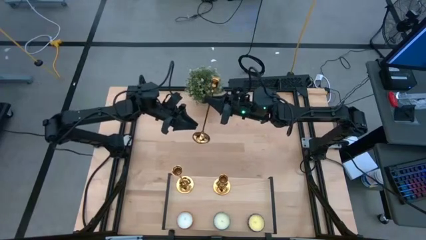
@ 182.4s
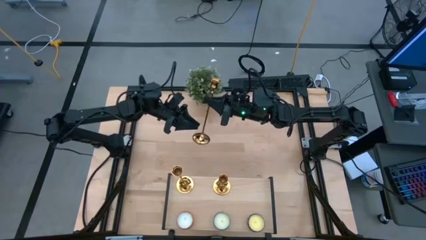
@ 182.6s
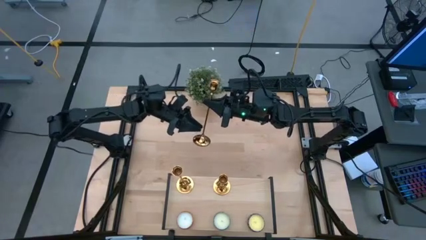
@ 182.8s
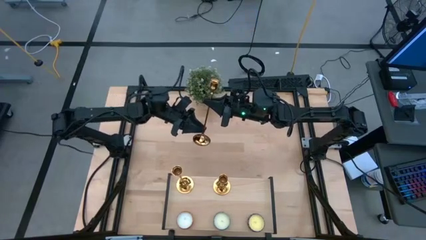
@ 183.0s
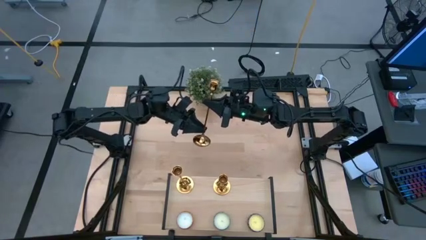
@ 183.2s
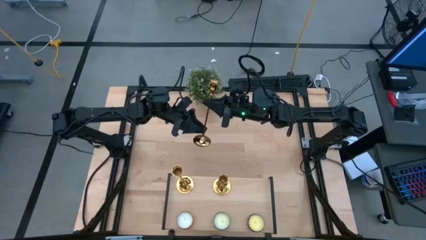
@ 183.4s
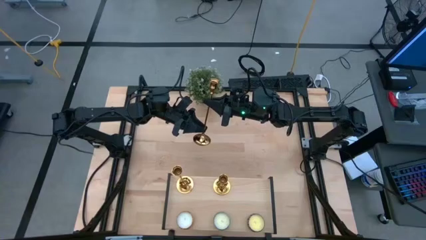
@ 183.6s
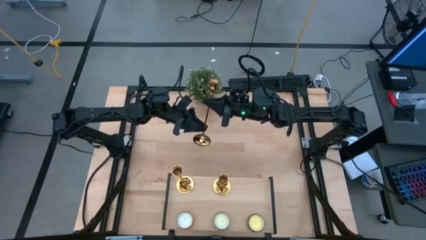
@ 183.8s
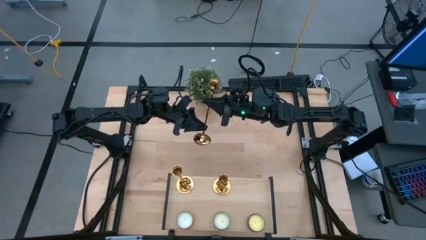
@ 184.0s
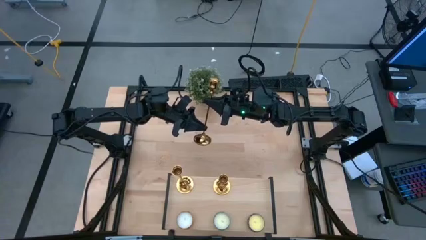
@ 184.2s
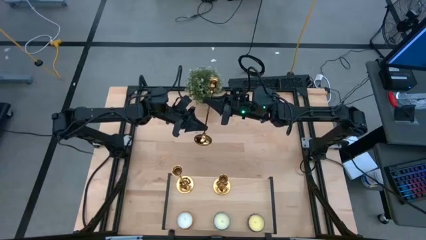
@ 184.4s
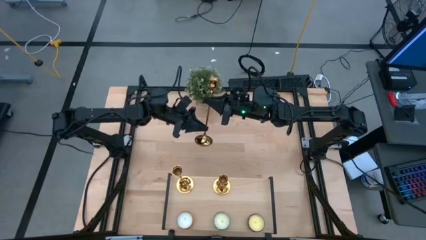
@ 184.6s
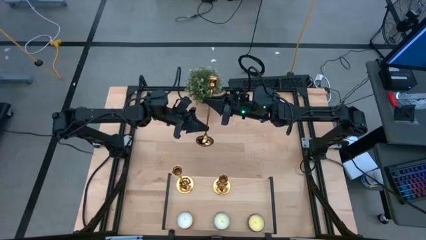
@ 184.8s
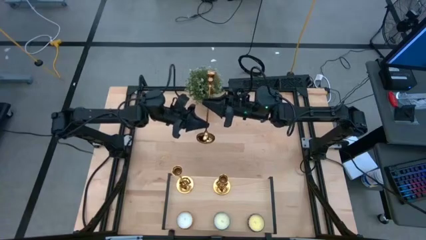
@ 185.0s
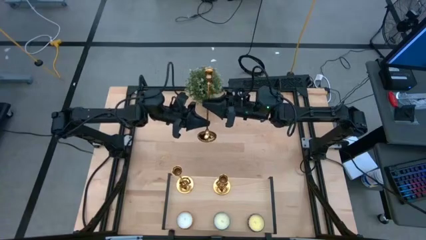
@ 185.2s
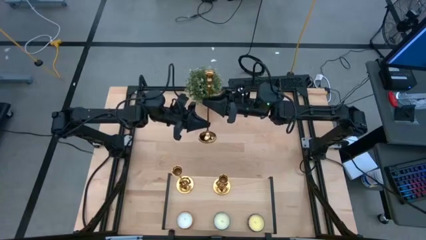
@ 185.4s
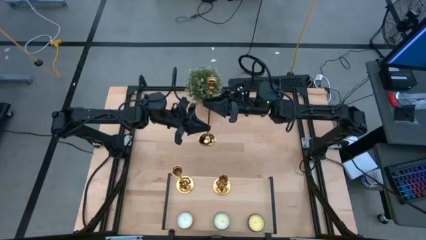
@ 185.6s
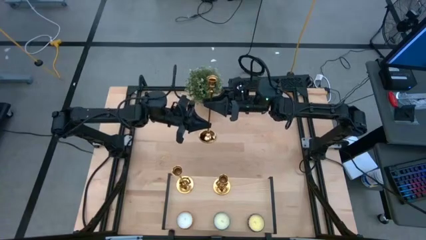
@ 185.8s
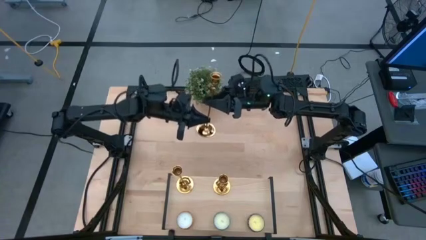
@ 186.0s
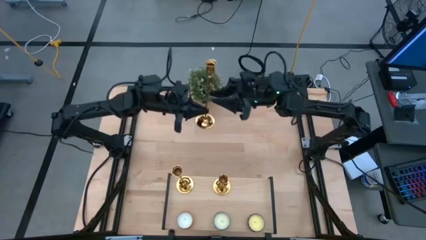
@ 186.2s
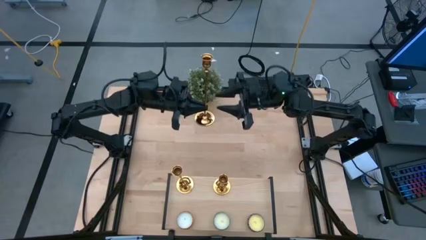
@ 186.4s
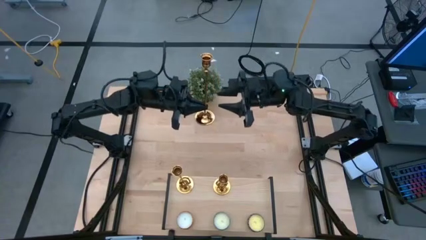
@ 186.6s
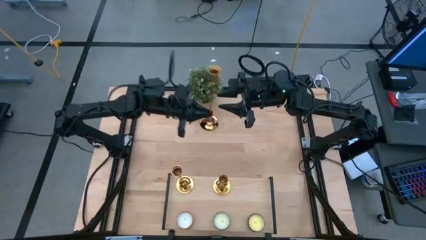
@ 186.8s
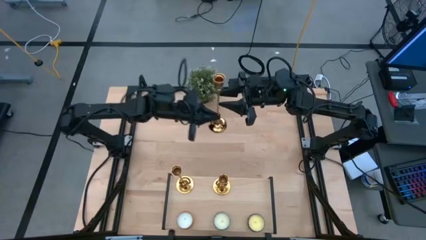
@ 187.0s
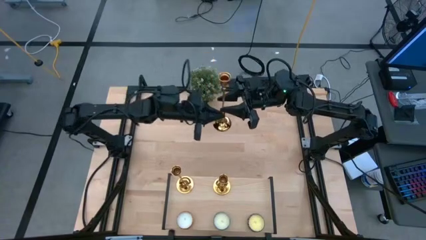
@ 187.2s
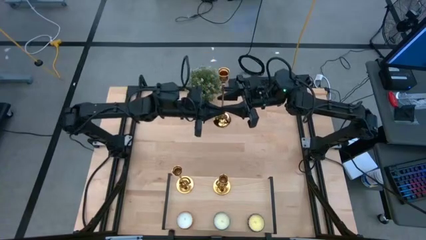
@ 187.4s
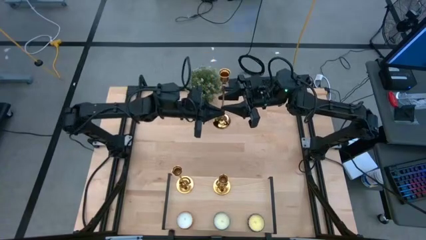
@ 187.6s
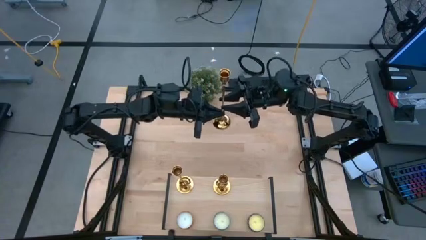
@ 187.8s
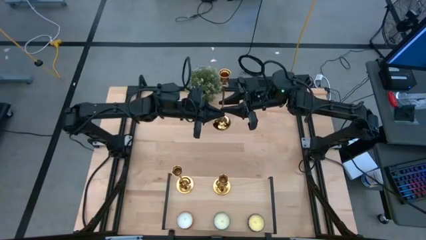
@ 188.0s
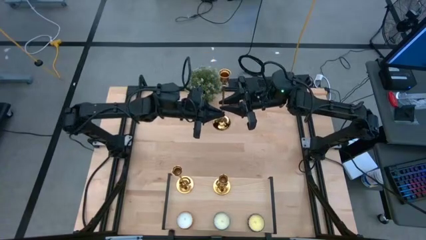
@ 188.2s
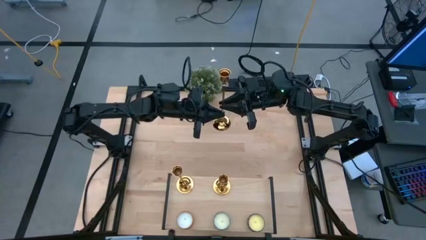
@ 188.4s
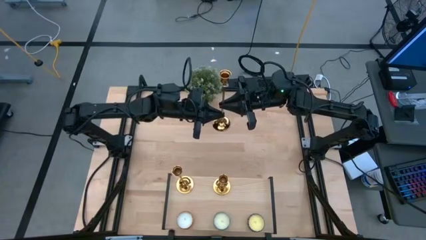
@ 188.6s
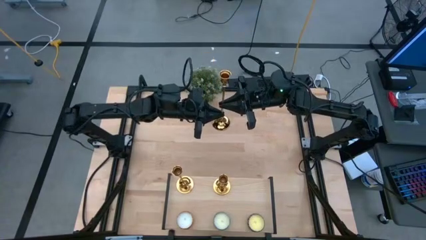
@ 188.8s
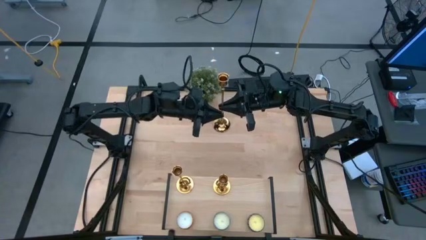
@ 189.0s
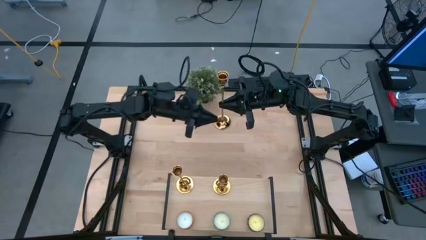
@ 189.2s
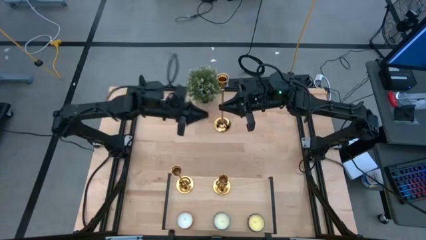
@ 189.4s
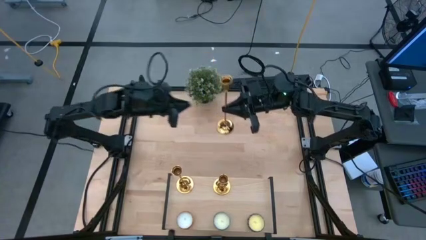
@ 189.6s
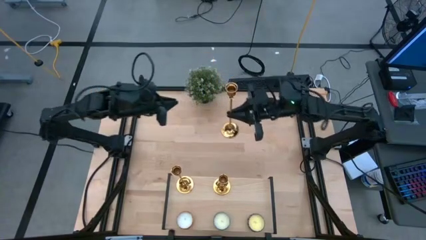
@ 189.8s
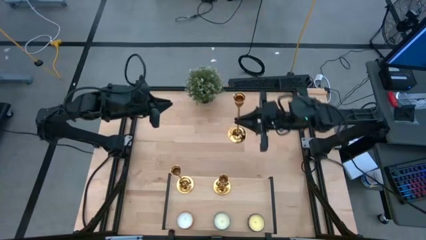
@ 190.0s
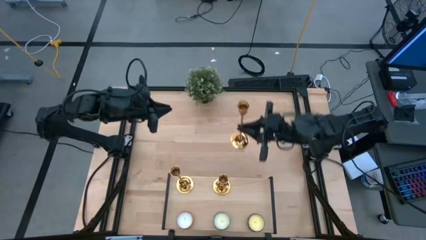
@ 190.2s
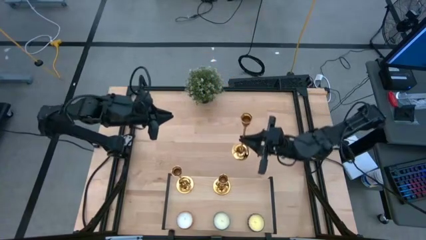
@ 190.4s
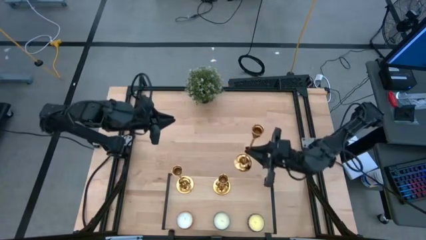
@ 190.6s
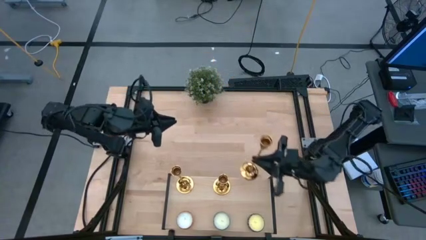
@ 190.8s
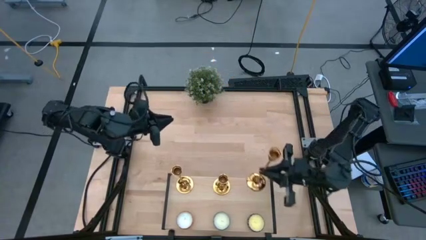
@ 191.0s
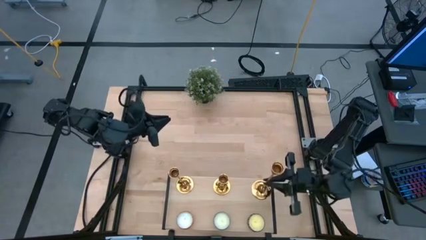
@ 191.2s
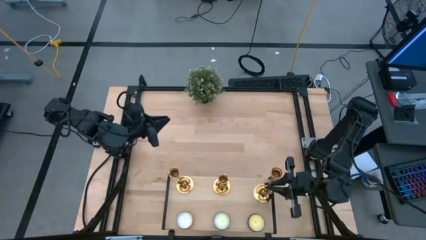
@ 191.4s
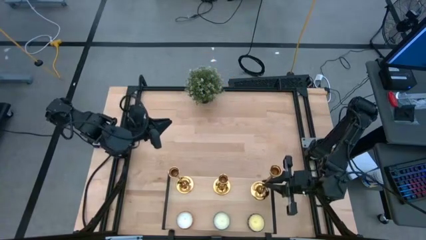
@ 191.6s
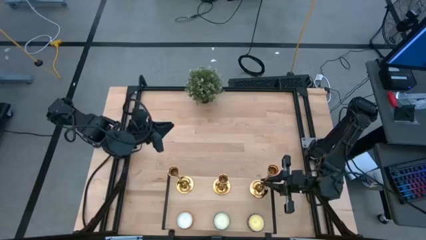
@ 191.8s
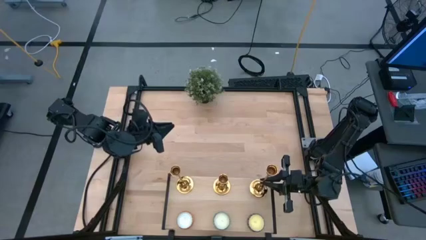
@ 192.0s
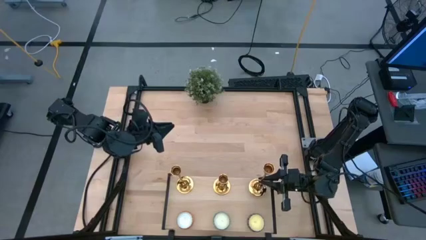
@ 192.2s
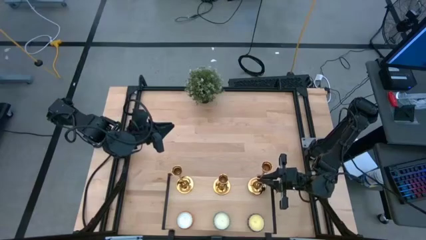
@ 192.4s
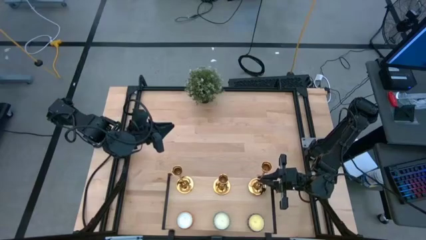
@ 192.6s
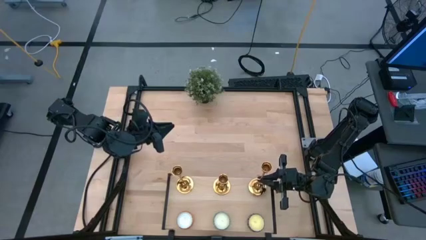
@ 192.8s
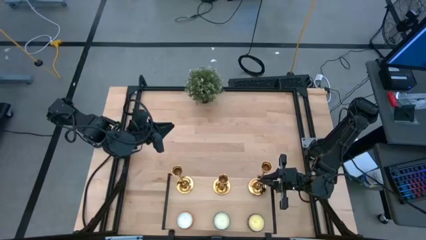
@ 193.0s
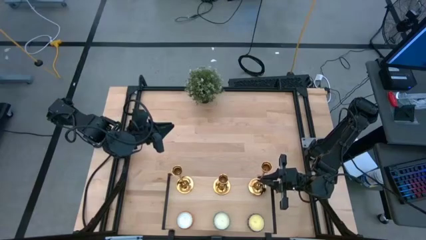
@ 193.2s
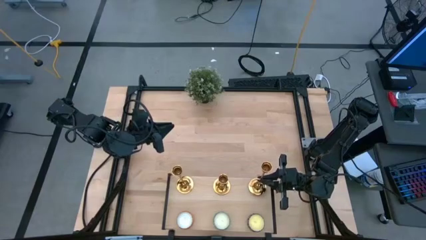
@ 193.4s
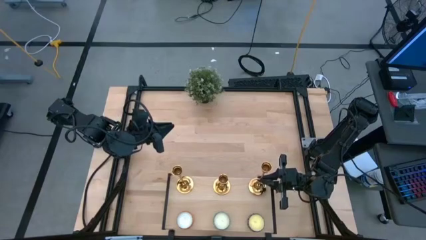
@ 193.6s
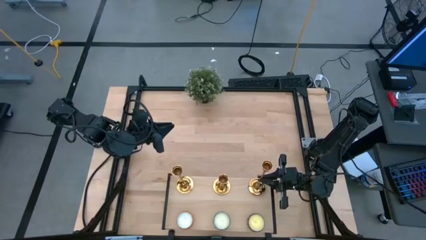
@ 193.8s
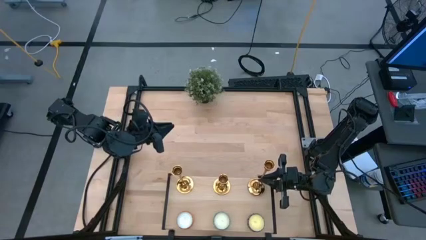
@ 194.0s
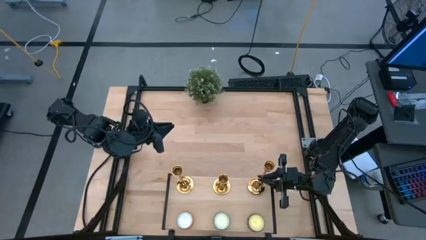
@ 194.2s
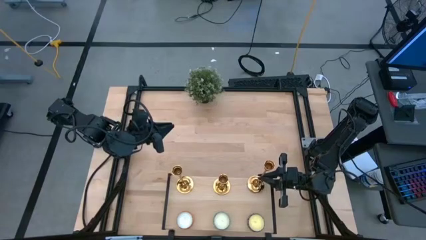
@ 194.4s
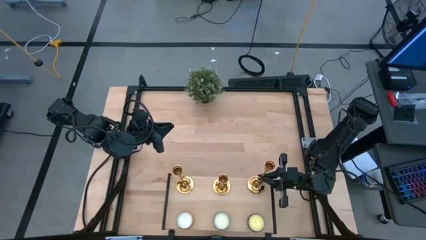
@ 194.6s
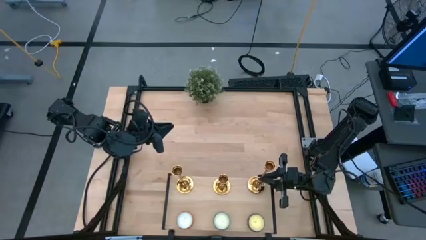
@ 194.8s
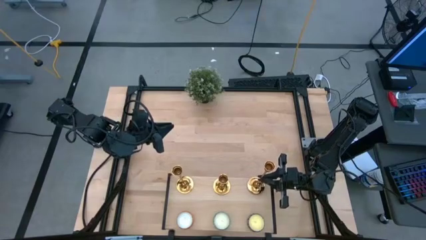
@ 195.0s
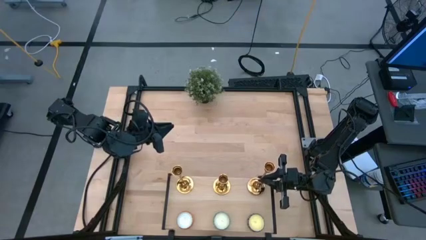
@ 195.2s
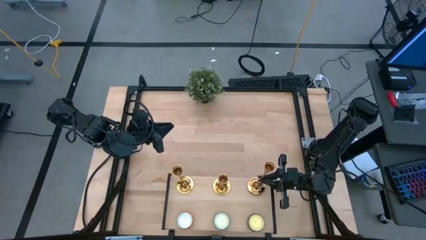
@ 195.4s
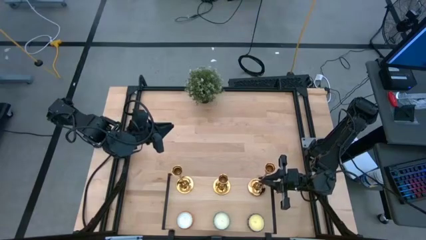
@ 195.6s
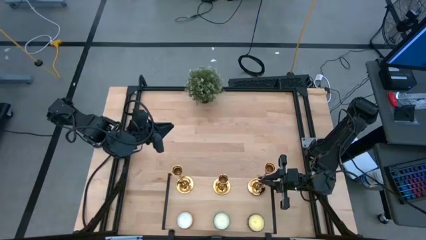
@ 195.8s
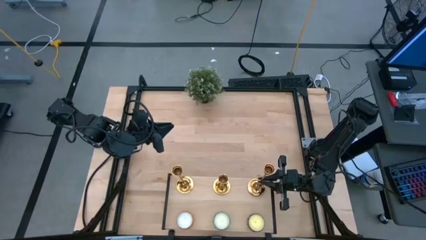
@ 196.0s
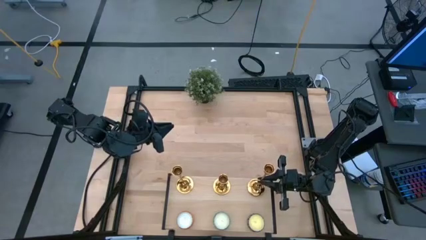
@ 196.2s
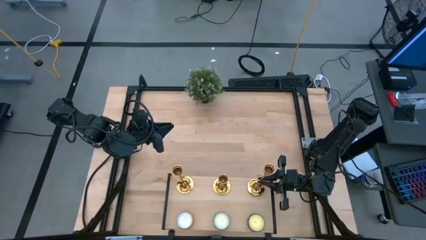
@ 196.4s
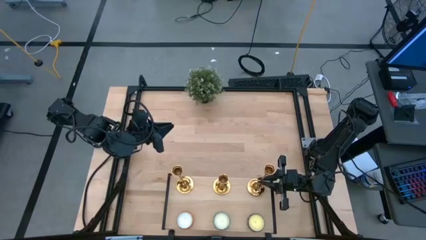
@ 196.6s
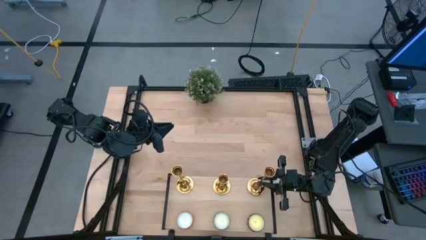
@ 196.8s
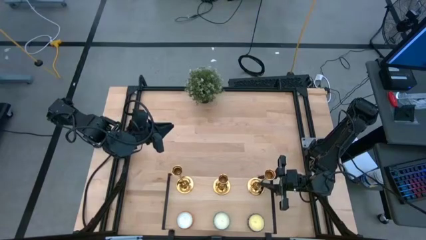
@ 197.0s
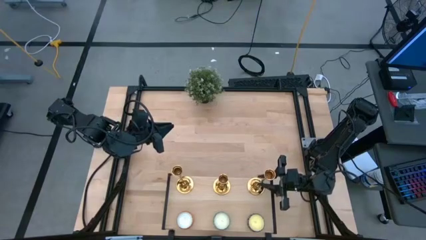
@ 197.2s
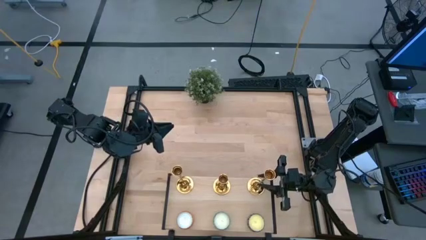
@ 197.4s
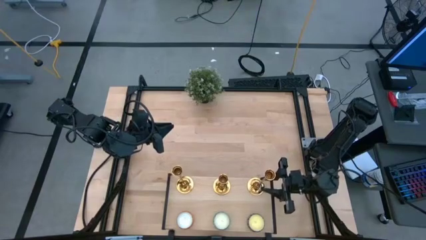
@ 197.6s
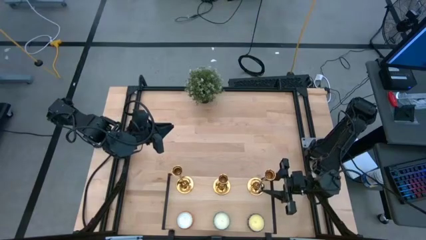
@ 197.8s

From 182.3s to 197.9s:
Task: Pick & Place candle stick holders
Put the gold candle stand on the shelf

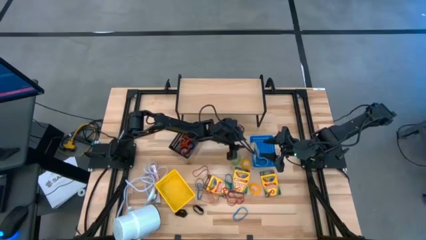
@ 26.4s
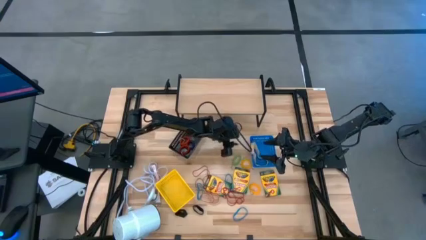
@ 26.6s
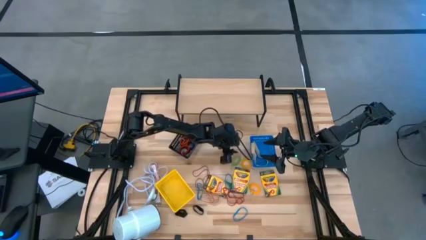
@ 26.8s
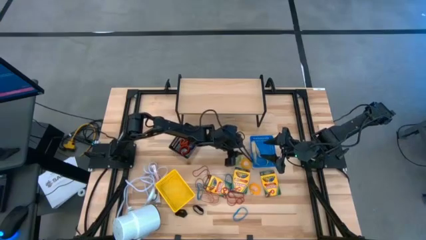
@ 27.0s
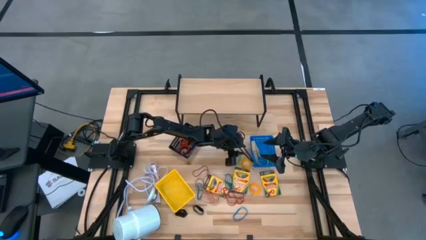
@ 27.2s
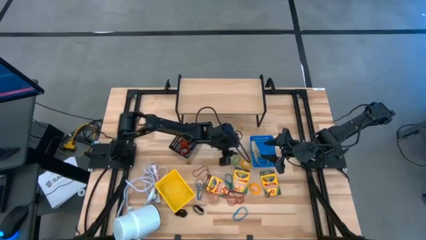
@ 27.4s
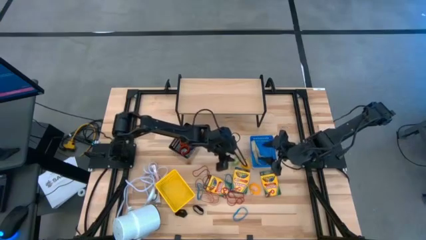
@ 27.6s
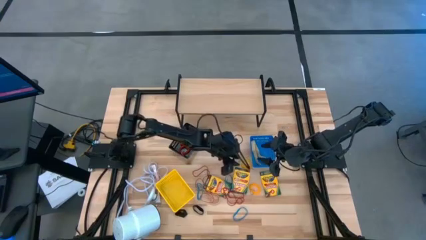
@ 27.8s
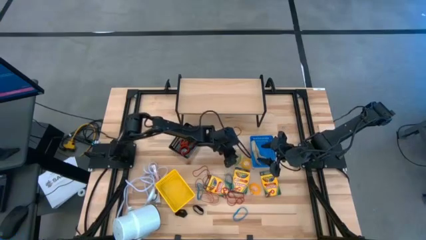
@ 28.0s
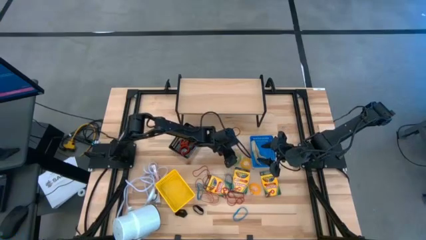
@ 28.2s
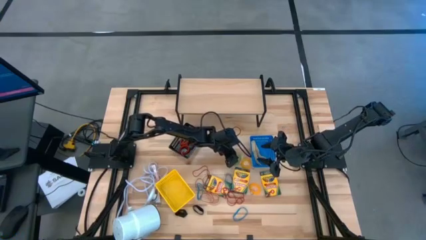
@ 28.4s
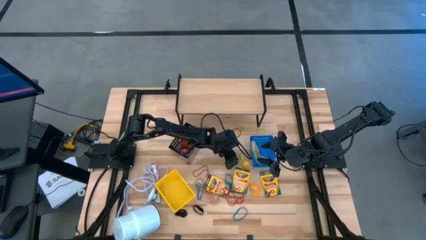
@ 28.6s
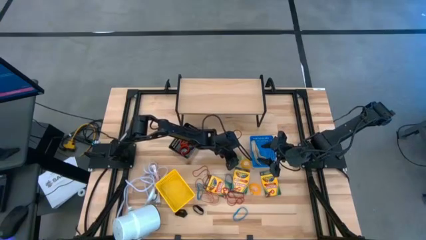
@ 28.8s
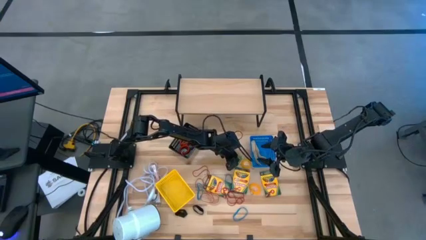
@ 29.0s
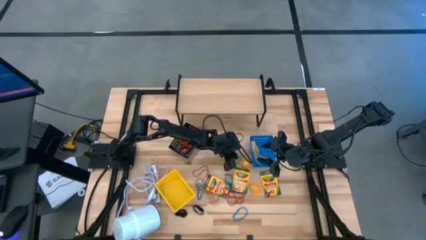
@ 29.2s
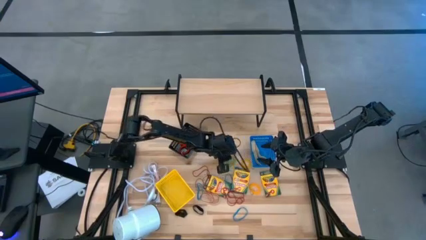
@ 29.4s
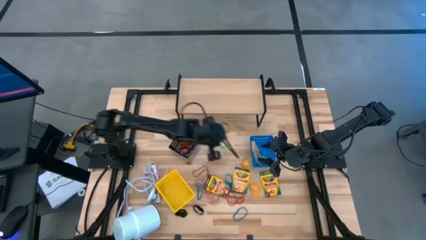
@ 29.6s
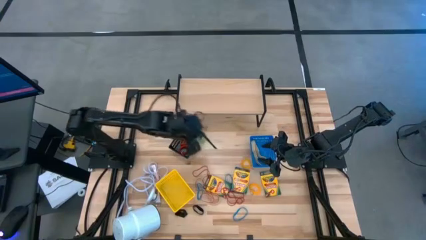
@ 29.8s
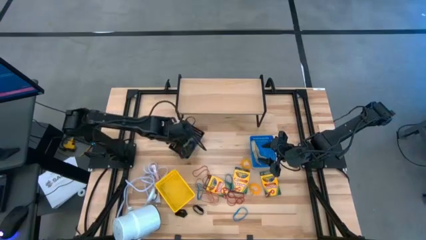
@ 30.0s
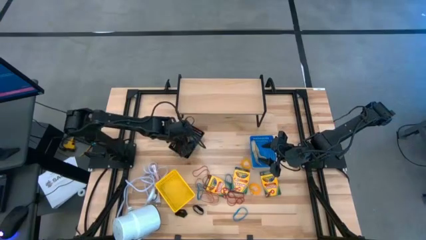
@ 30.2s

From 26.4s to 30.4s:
Task: Pick & Place Office Desk Supplies
Put the green spring keychain into the blue bin
